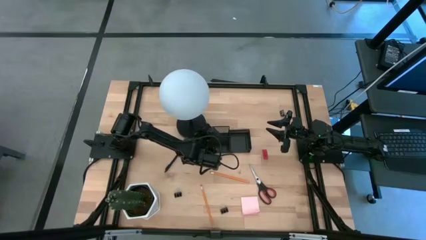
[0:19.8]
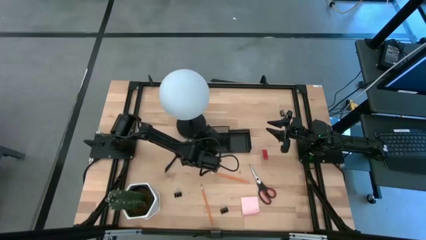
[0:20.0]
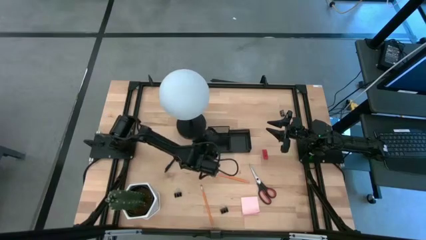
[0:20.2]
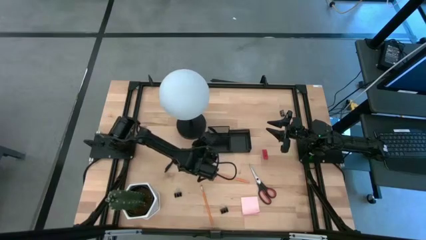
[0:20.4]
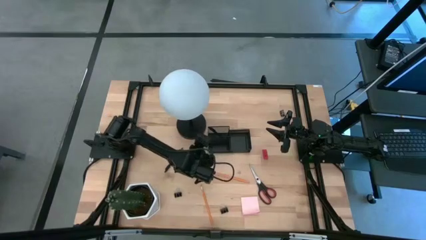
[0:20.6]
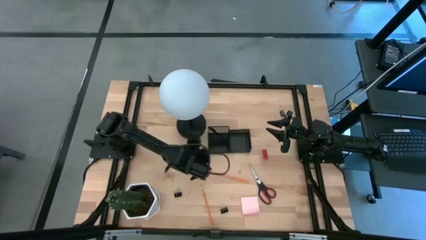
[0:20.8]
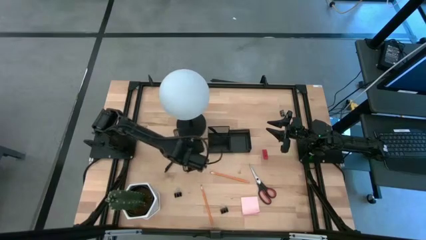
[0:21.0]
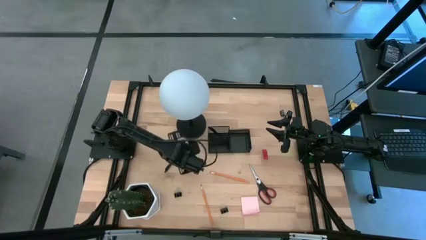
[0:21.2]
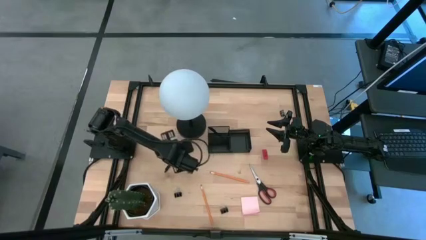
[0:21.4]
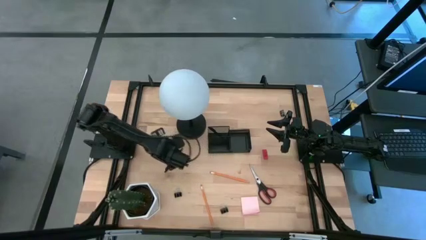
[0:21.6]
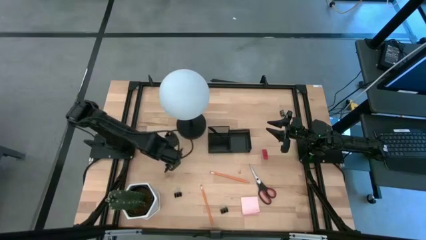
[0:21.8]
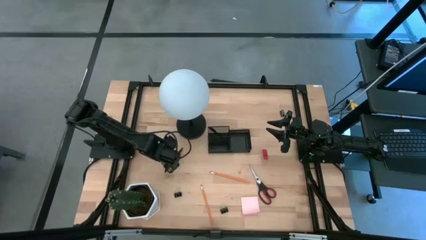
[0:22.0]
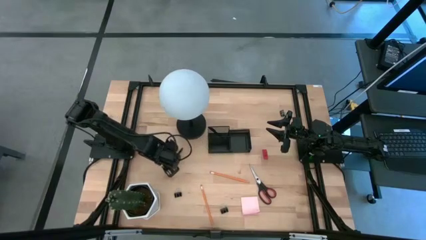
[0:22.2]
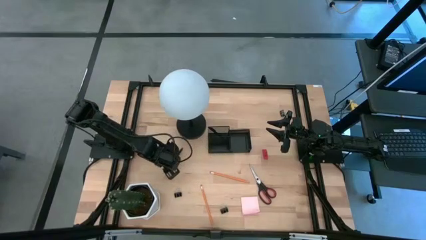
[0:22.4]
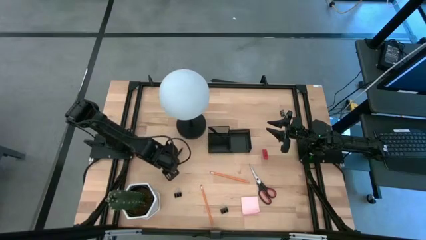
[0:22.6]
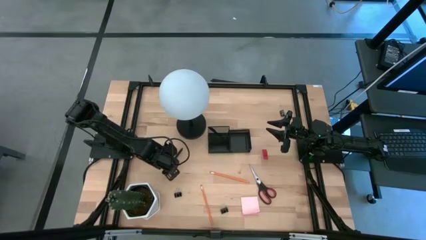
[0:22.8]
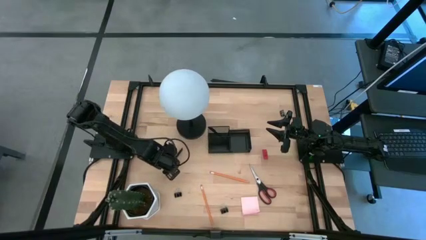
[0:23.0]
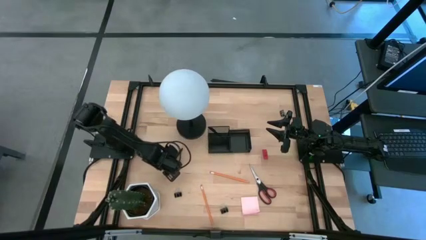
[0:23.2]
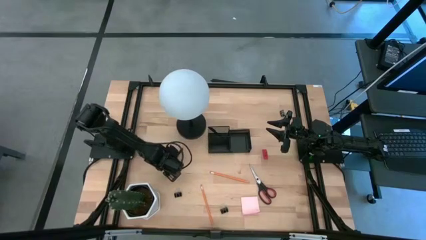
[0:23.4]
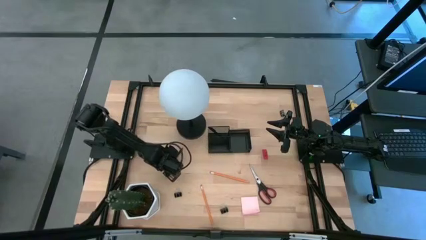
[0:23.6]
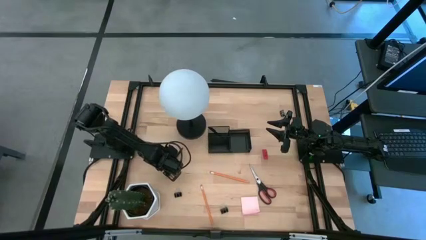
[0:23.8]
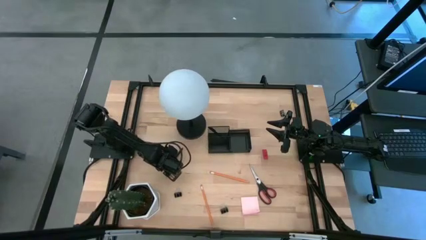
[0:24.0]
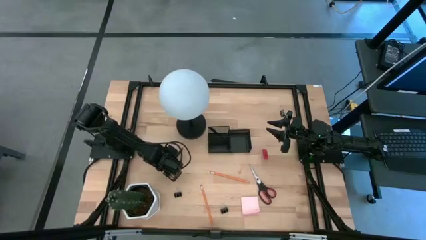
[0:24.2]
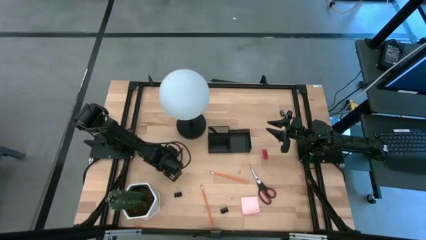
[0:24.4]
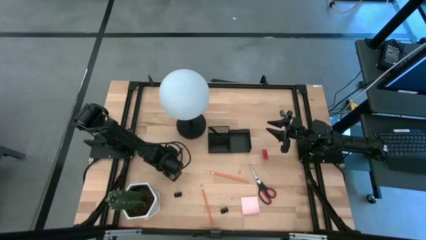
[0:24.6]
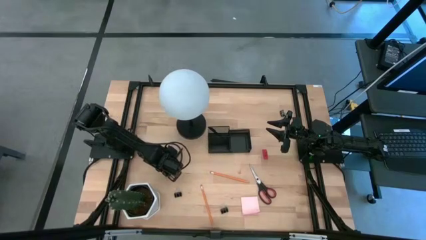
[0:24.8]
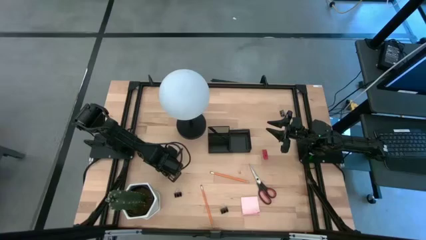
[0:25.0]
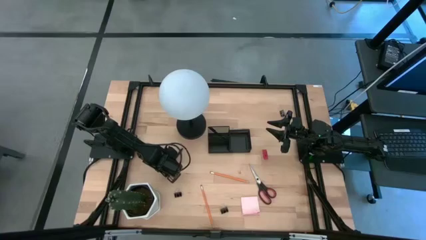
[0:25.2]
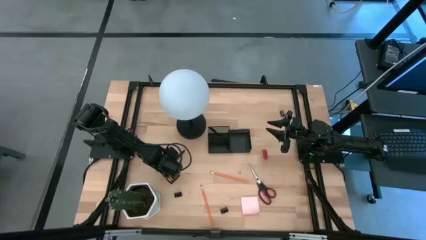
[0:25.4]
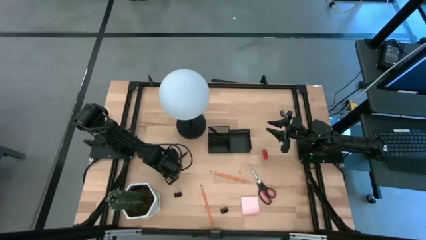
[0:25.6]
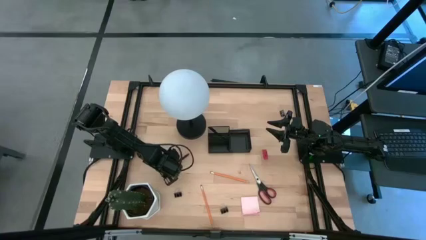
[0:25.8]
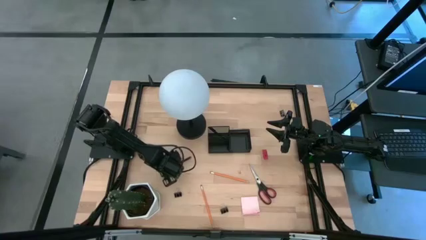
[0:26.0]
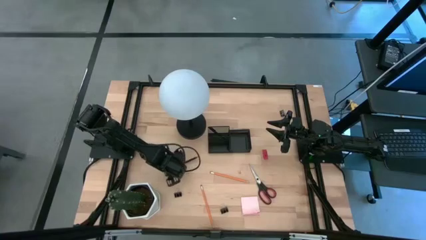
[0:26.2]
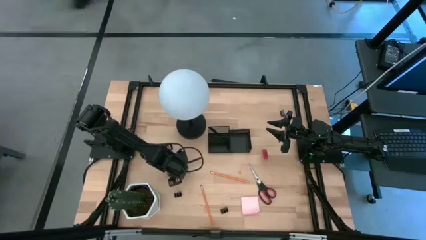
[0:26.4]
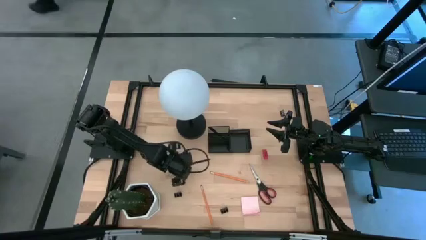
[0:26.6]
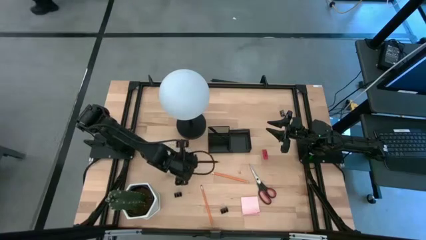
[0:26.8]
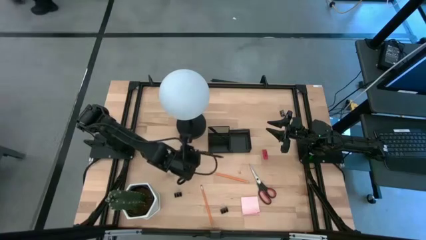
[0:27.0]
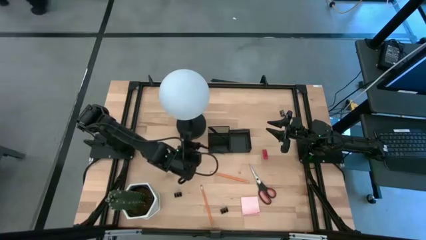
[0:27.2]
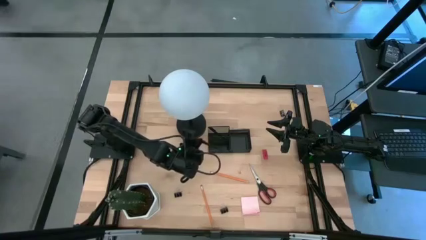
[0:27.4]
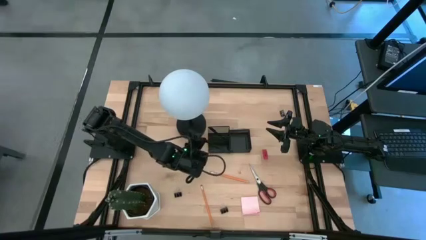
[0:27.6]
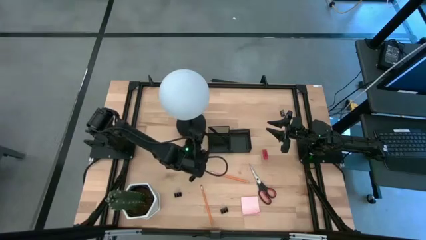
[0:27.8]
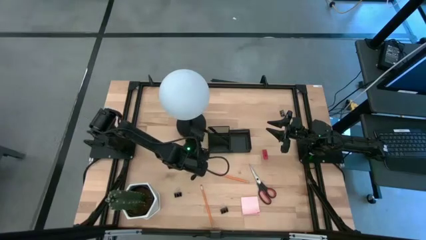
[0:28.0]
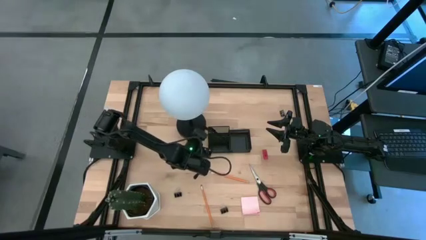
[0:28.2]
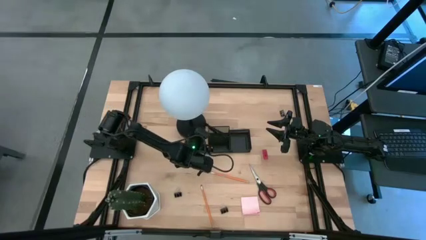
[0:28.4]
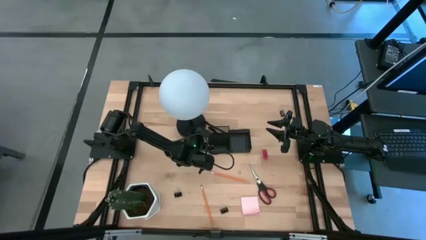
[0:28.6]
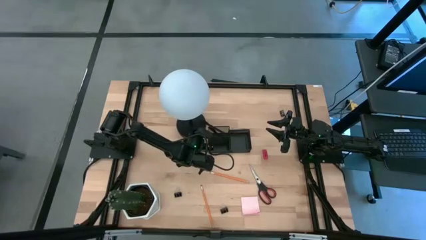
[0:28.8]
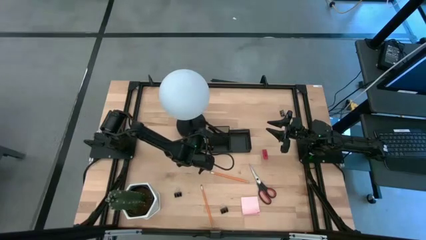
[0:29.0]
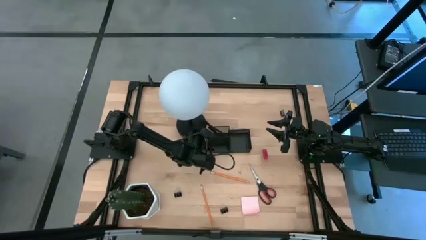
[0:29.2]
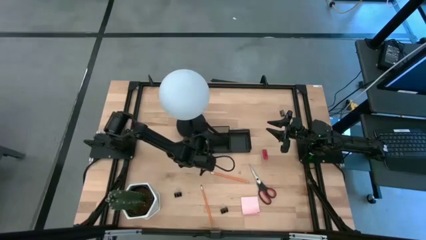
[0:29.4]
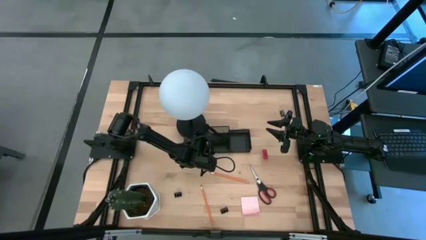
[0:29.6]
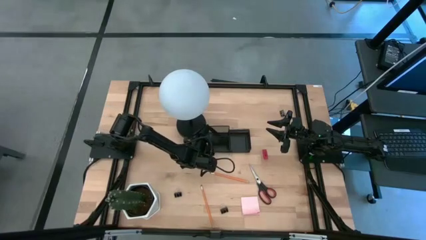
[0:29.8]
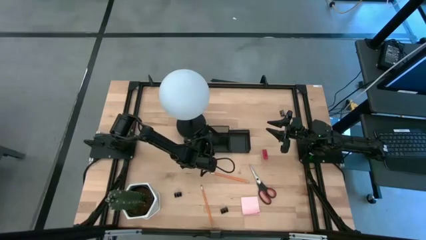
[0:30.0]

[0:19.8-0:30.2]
Task: Pick and place office supplies into organizer
Put the black pen into the black desk organizer

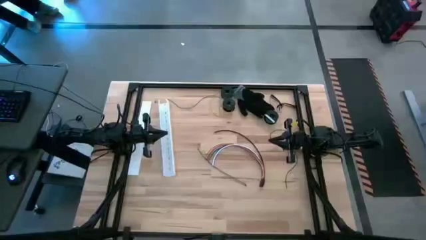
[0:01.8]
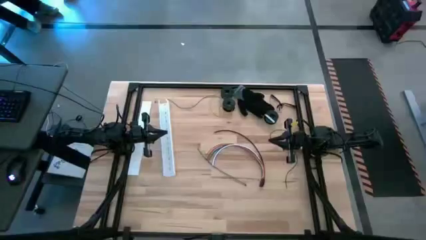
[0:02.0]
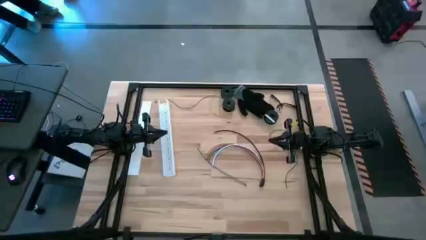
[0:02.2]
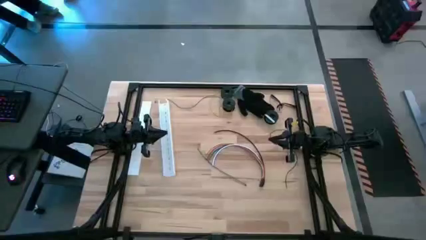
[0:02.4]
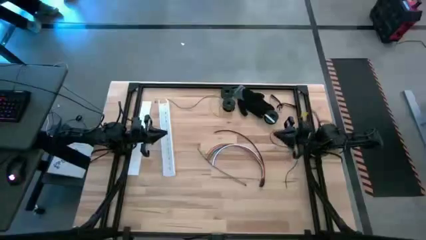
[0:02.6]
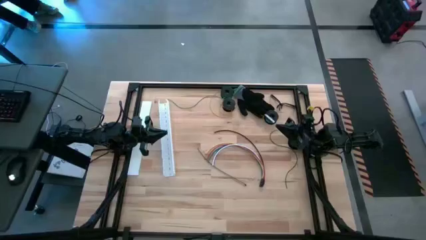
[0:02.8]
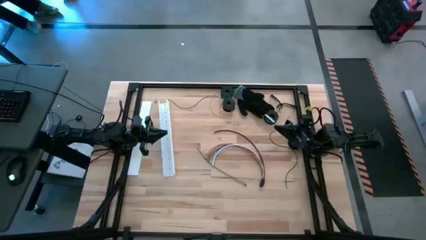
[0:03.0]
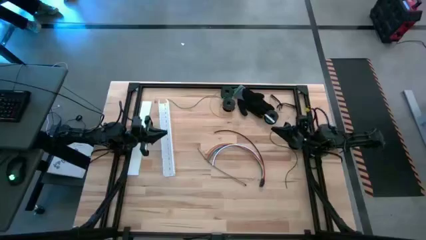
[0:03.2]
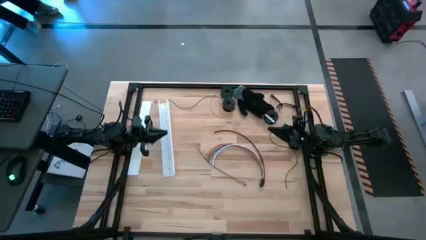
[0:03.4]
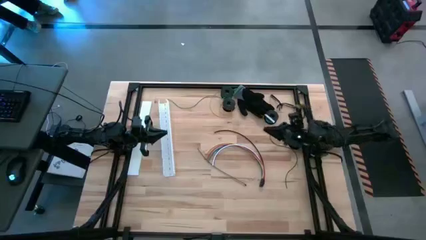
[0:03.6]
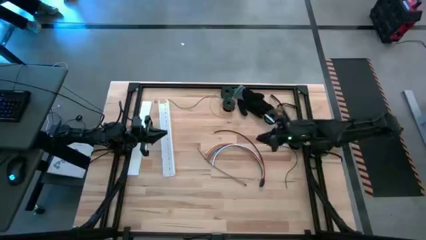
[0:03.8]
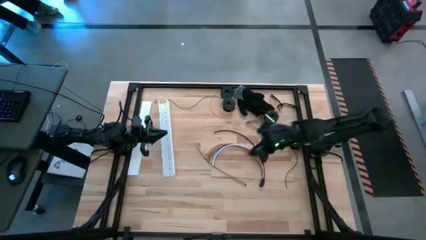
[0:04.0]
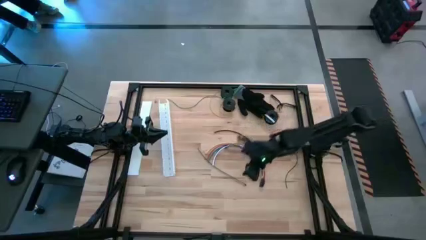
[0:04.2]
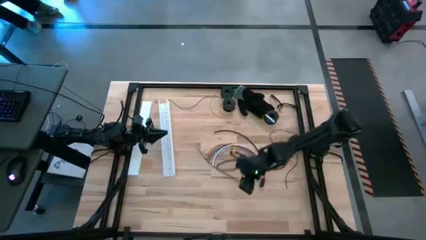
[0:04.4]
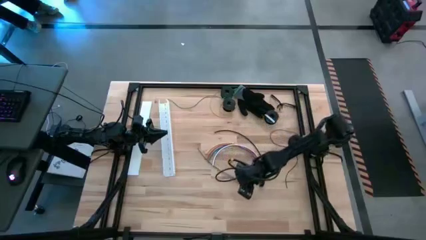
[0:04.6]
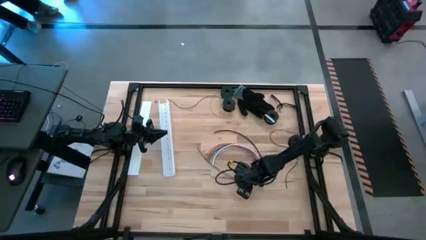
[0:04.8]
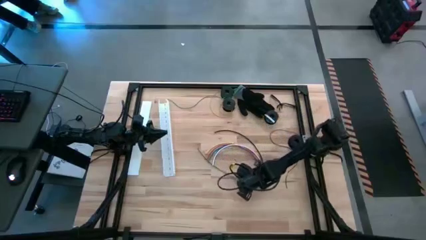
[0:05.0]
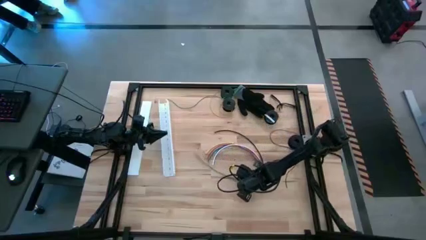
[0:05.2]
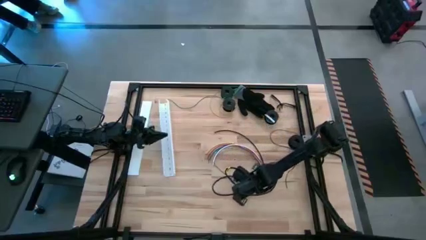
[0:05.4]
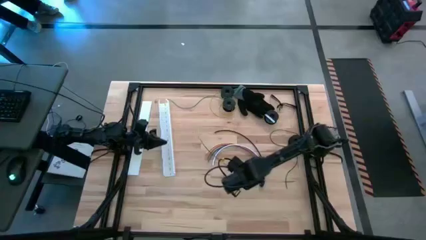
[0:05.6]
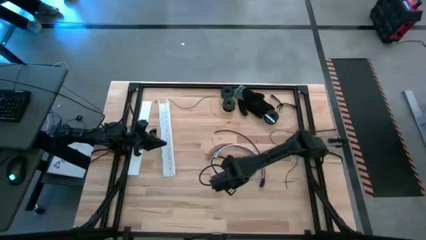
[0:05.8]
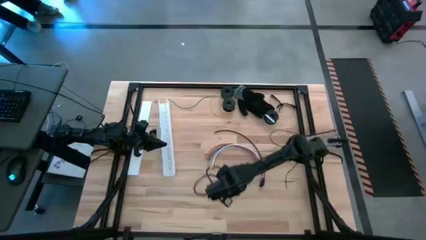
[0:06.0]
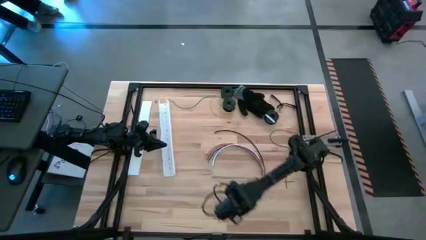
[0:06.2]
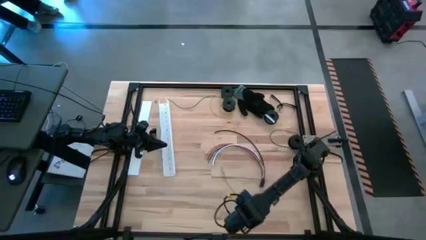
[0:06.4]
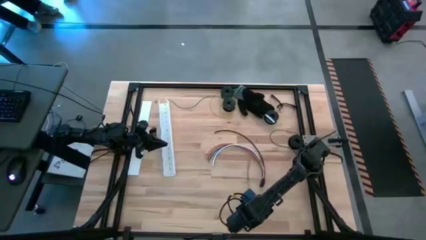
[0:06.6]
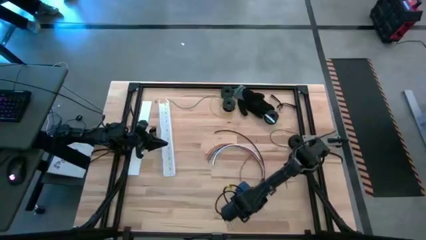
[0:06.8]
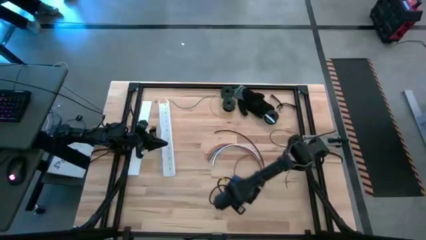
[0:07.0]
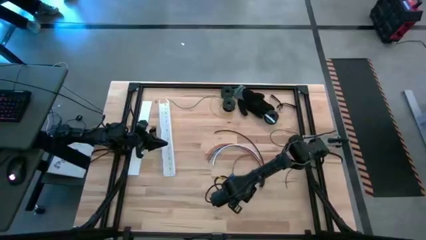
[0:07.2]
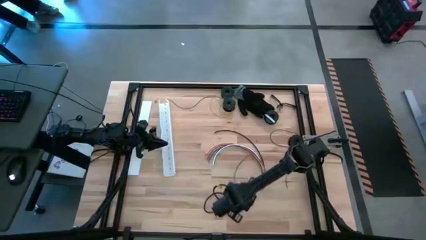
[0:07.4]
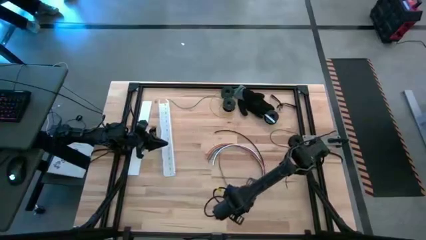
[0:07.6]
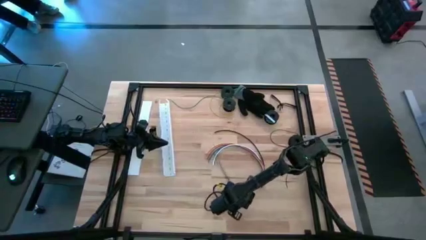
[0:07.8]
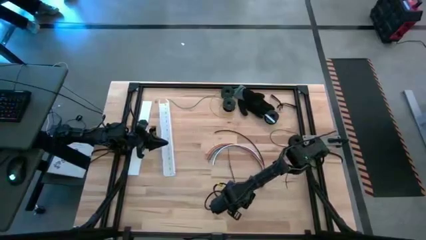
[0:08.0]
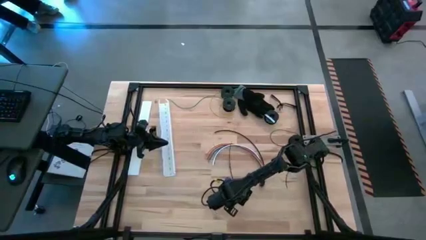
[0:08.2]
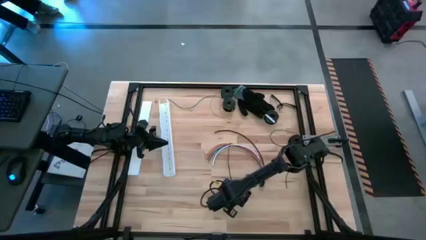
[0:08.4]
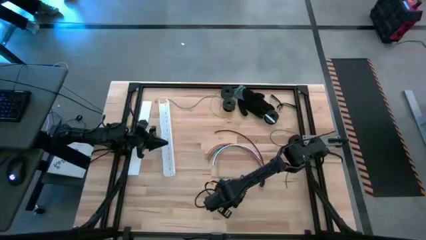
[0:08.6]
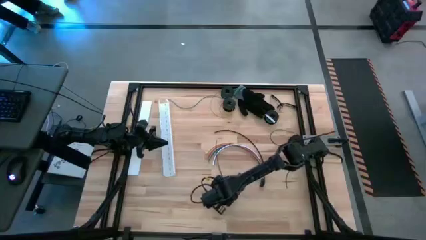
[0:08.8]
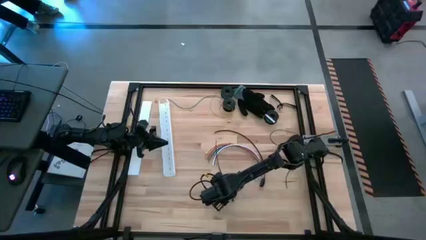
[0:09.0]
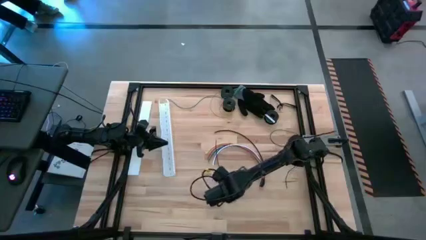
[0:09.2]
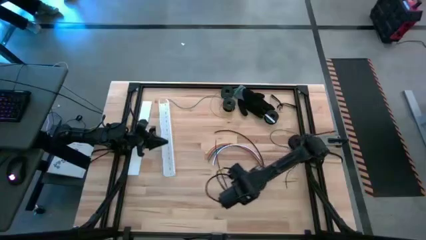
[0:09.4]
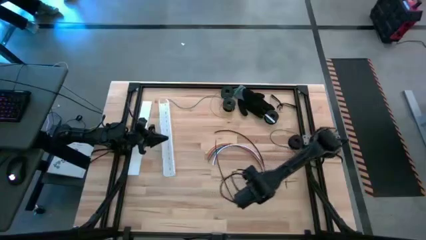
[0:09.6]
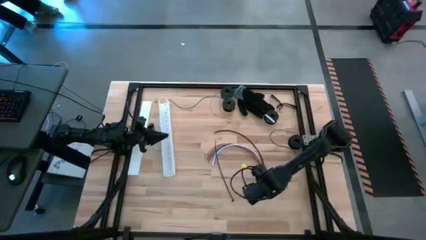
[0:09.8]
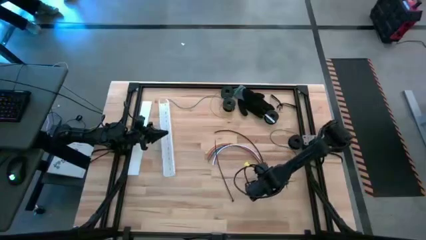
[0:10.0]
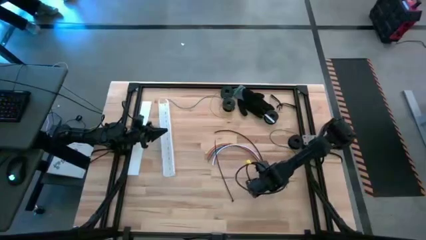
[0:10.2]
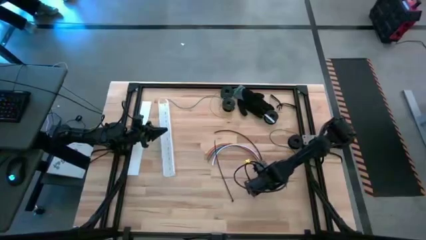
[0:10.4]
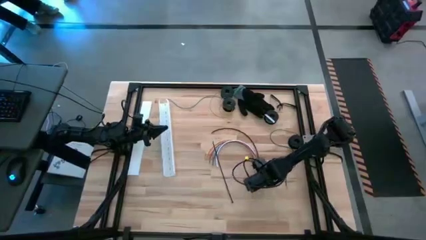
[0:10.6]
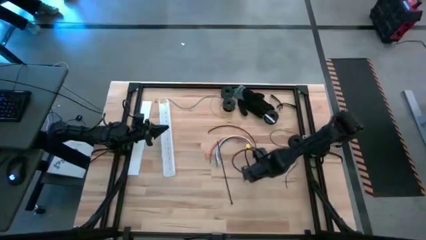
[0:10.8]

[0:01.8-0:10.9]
Task: Ziptie cables
Wrap the cables together using a black zip tie
